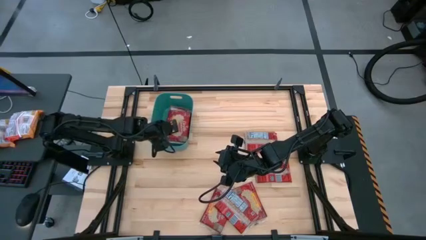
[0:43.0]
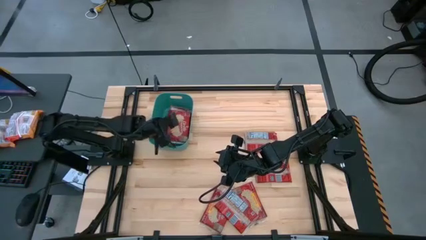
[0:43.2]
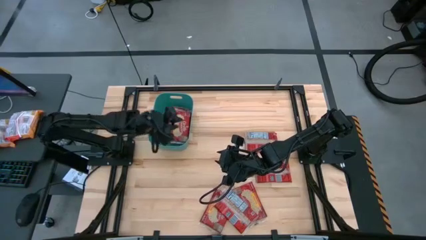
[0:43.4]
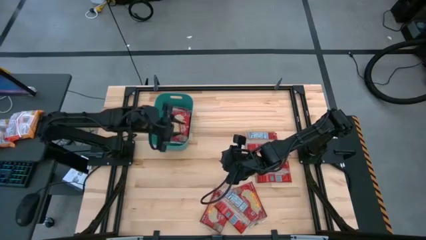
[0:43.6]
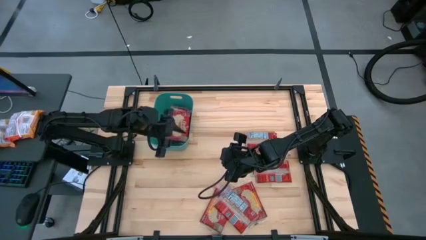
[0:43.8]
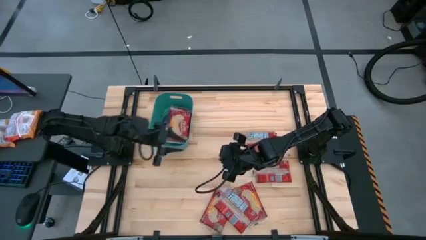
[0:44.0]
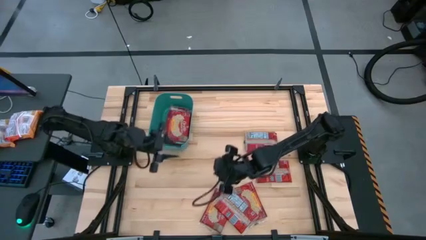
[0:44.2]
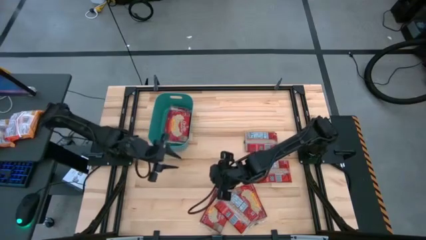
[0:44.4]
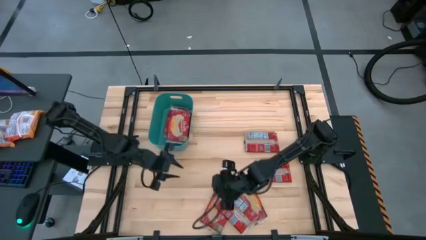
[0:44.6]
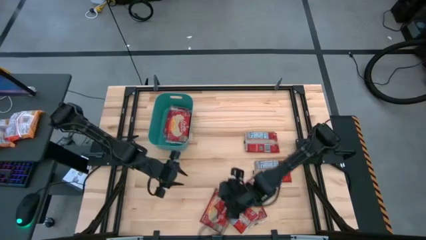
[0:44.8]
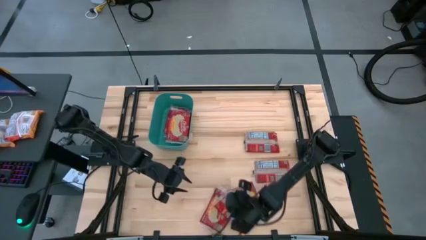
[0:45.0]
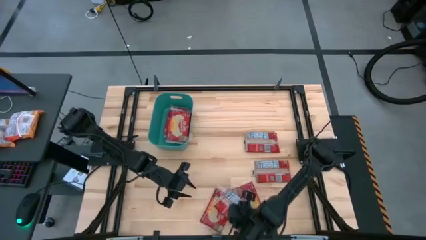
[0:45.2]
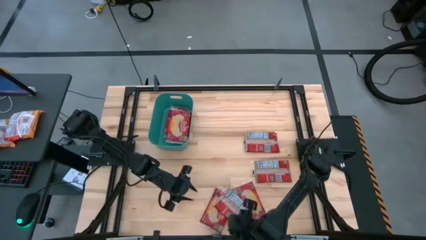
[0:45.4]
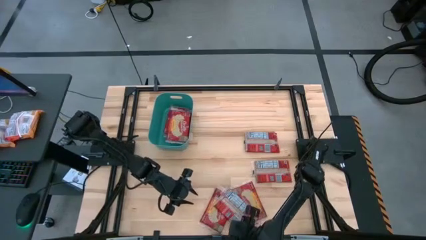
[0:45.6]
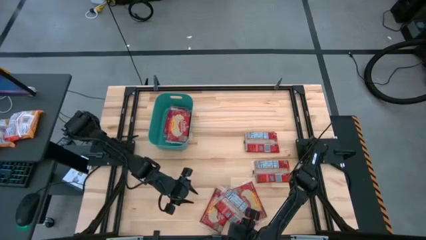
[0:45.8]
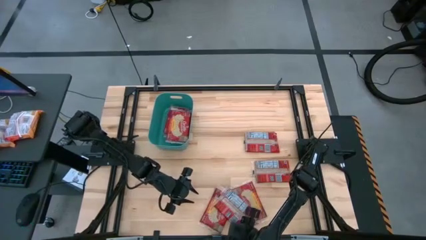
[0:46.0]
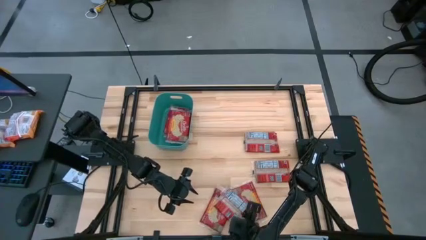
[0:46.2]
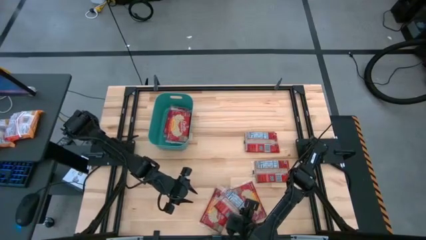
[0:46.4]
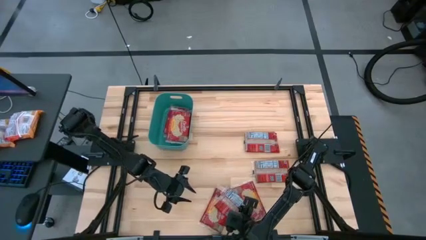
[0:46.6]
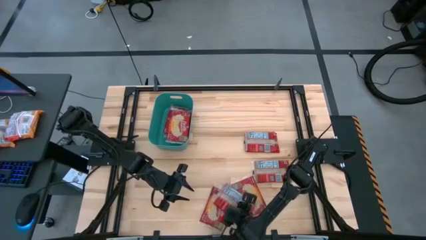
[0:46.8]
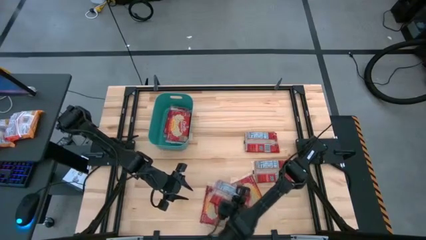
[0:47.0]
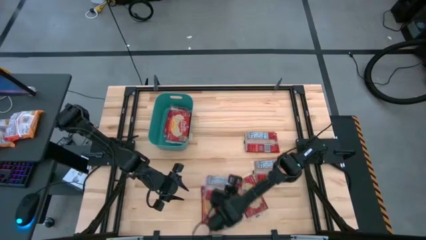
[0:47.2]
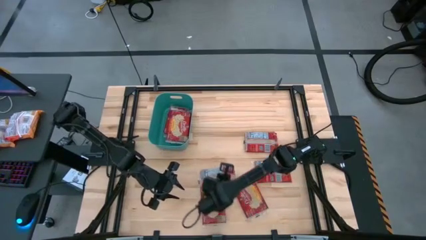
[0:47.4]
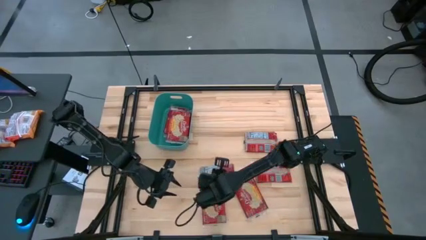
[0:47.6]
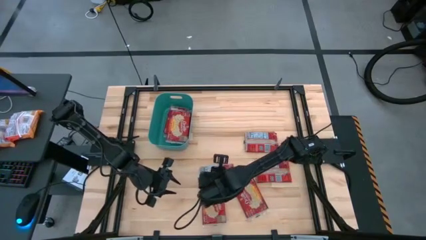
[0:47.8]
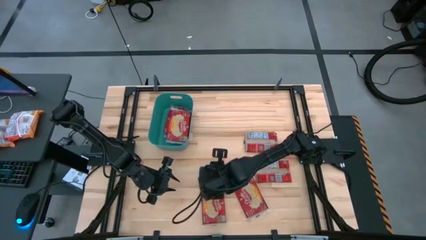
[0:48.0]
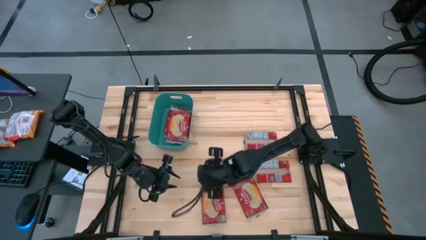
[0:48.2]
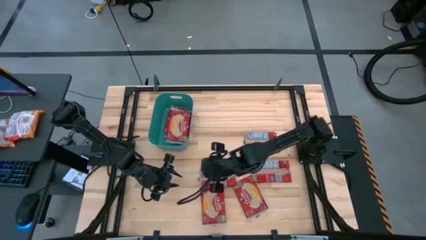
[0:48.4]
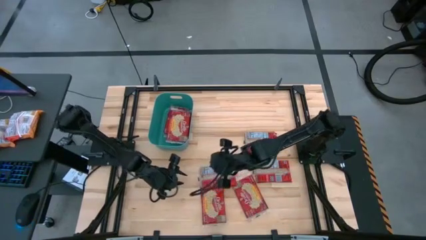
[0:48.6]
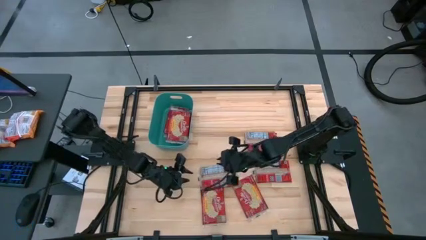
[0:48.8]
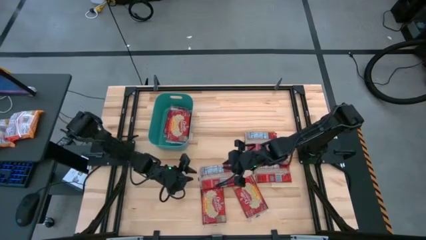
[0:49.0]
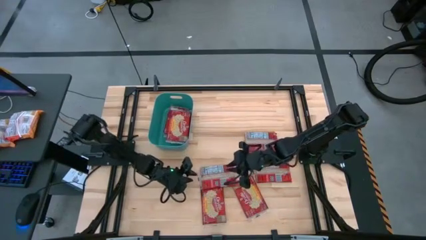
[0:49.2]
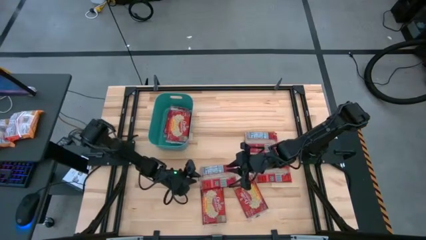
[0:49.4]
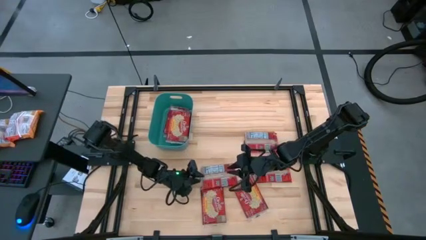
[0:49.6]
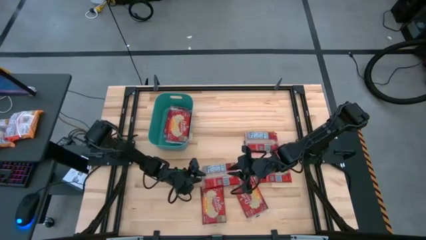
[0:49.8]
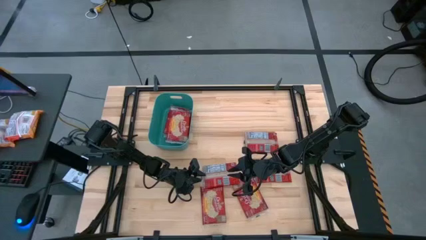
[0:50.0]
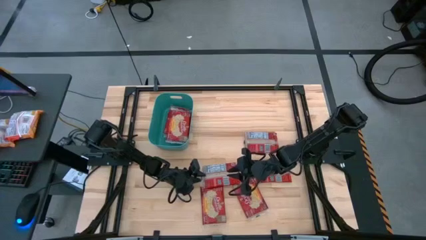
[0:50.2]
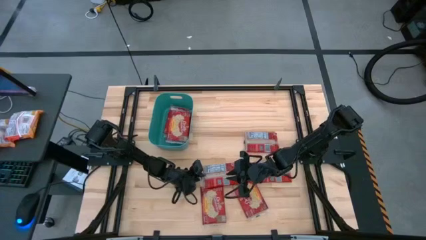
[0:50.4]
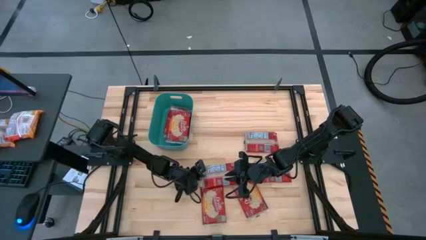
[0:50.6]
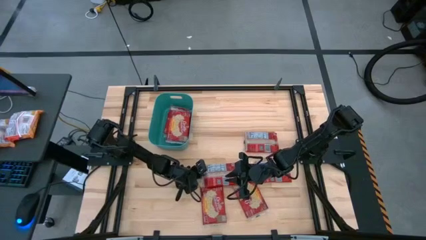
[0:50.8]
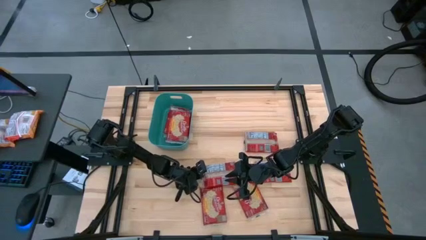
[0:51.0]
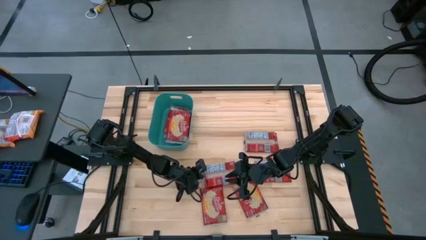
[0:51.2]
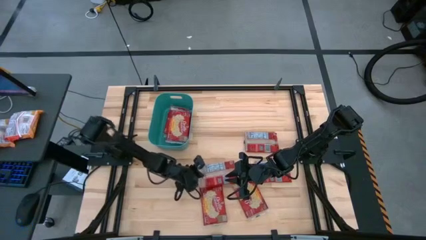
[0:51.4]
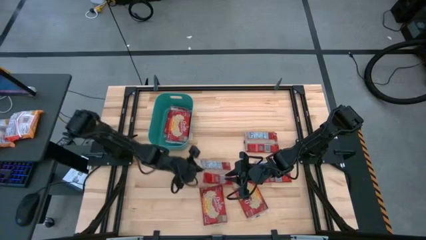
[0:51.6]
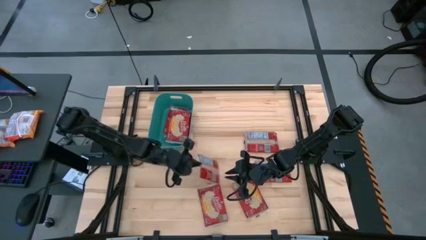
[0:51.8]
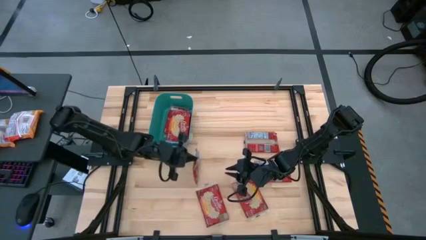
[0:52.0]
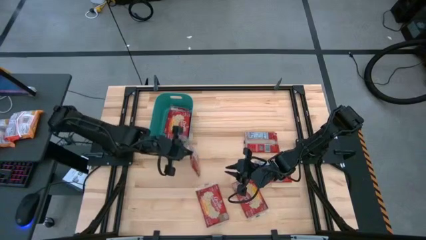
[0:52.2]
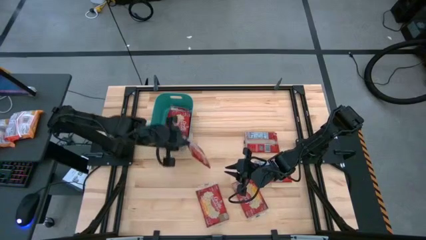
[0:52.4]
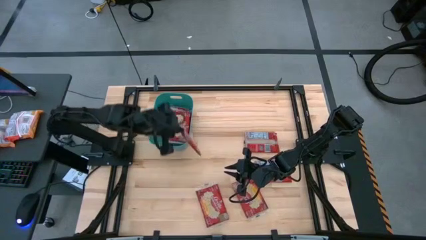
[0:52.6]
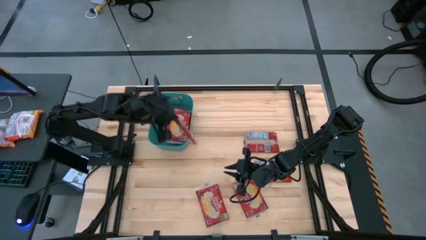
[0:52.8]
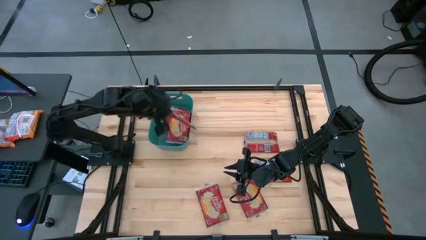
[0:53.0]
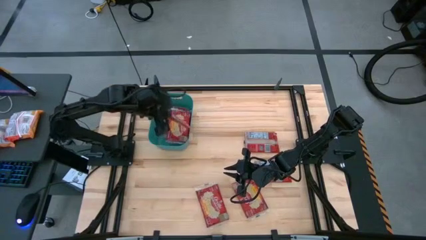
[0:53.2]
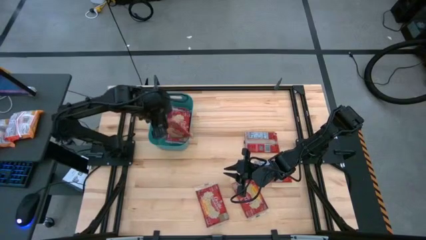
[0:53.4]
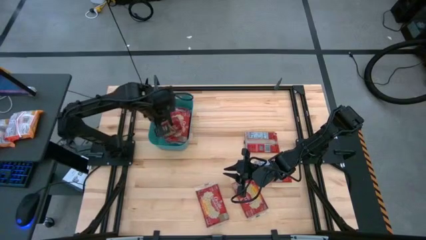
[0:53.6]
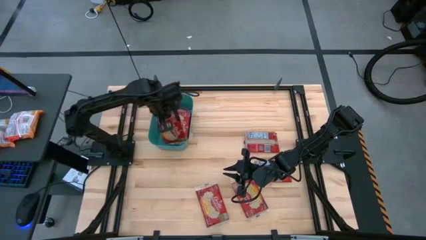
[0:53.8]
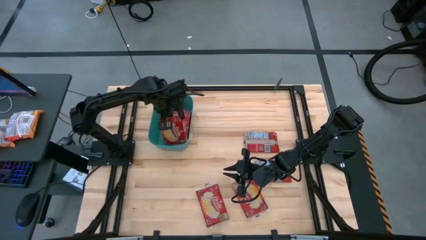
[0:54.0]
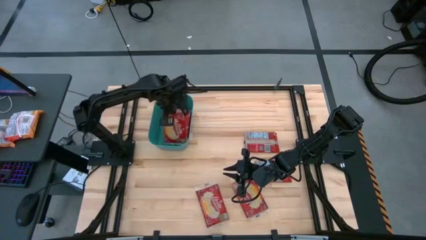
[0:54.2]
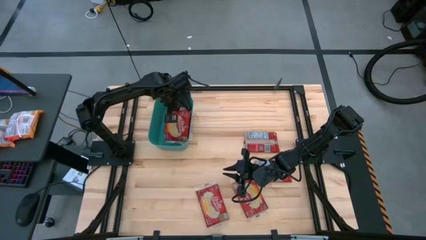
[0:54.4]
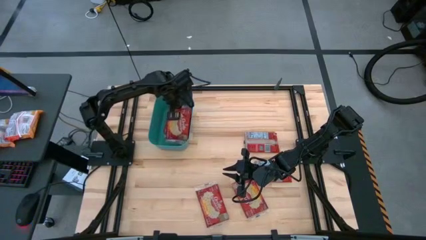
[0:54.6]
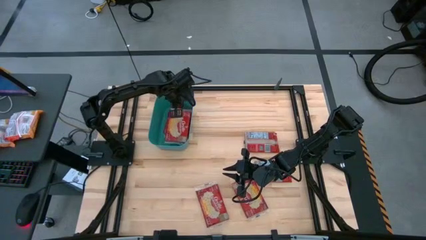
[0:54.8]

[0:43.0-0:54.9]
Task: Sort popcorn bags into baskets
Put the red popcorn bag into the green bin

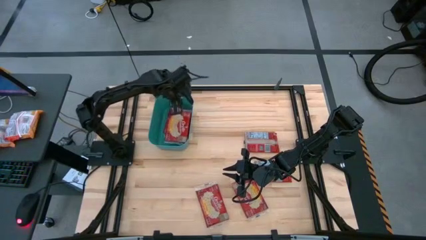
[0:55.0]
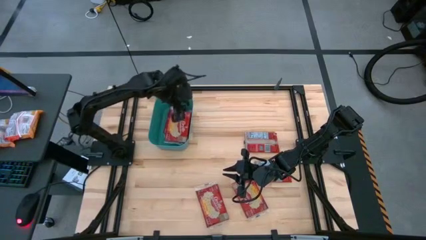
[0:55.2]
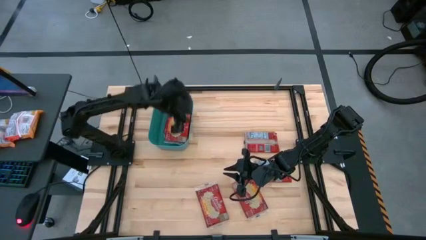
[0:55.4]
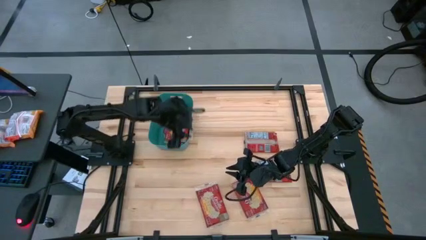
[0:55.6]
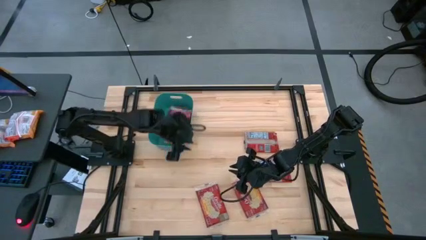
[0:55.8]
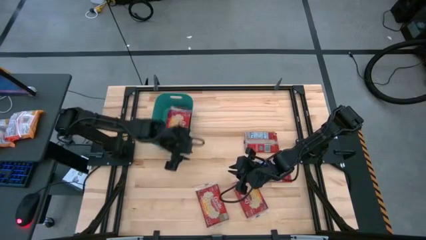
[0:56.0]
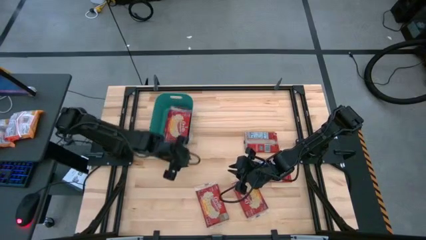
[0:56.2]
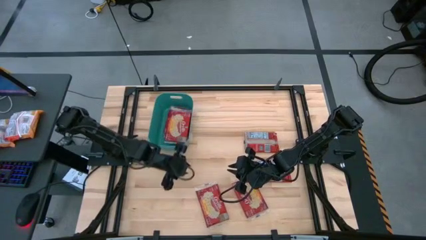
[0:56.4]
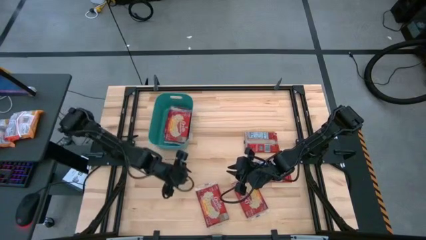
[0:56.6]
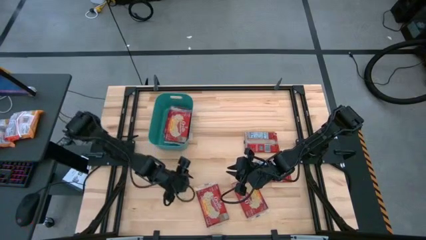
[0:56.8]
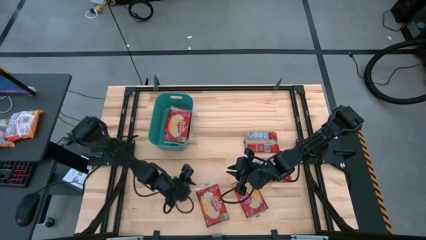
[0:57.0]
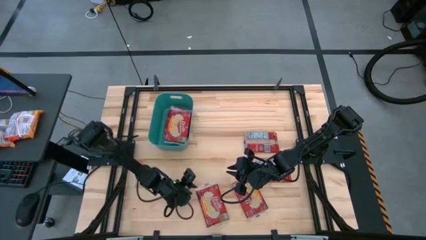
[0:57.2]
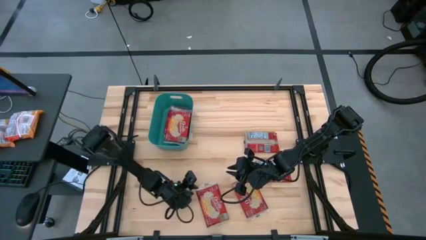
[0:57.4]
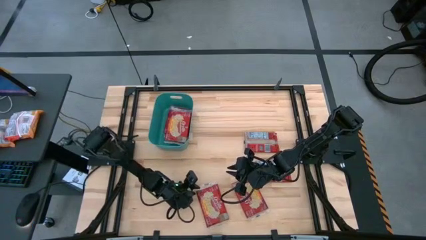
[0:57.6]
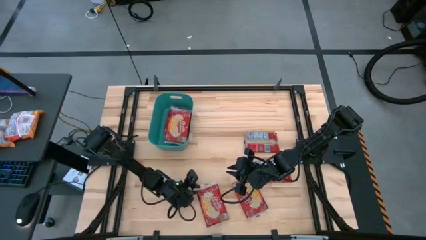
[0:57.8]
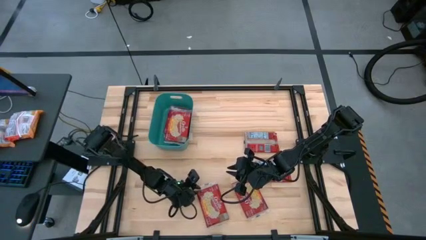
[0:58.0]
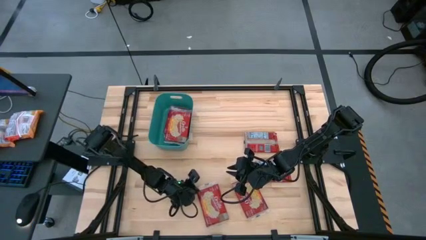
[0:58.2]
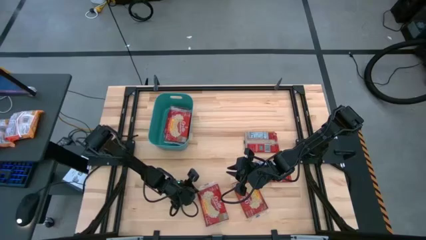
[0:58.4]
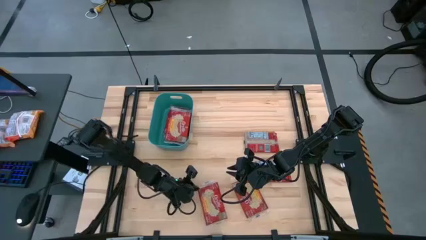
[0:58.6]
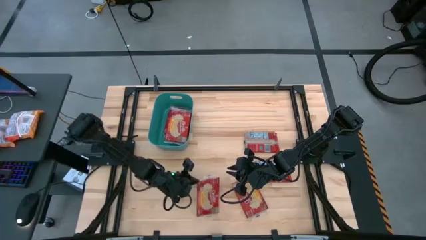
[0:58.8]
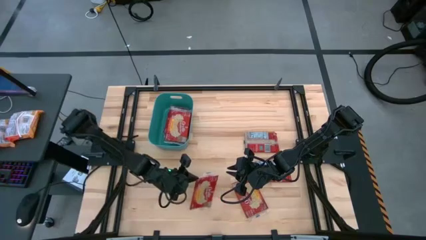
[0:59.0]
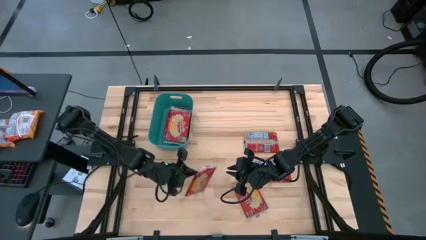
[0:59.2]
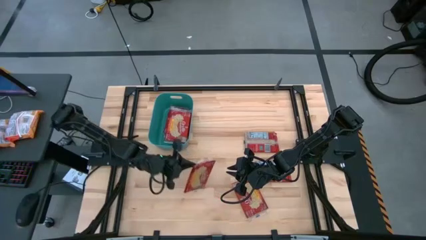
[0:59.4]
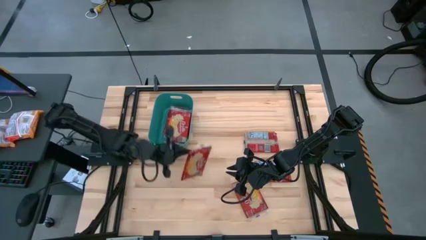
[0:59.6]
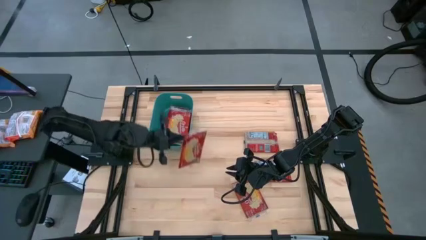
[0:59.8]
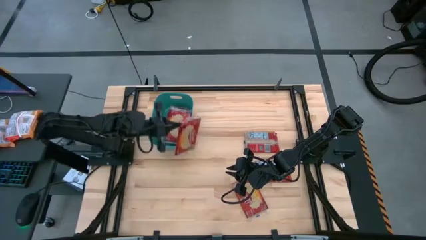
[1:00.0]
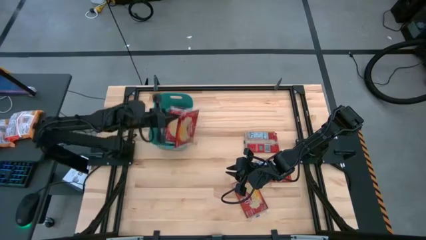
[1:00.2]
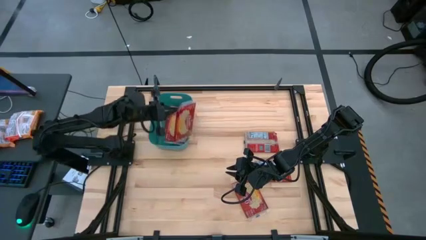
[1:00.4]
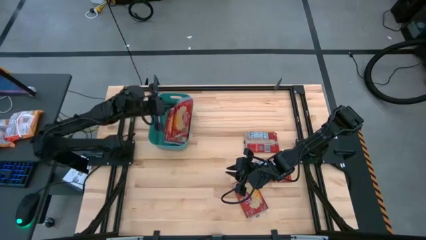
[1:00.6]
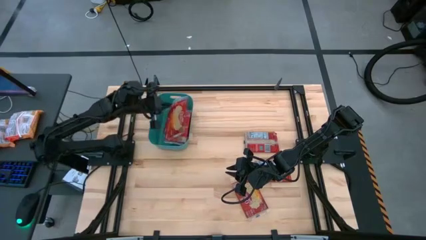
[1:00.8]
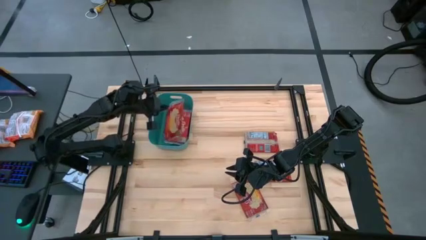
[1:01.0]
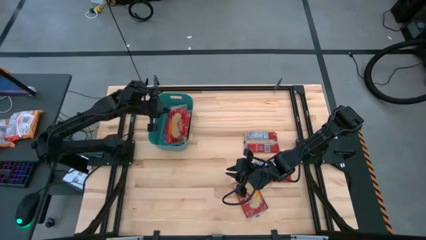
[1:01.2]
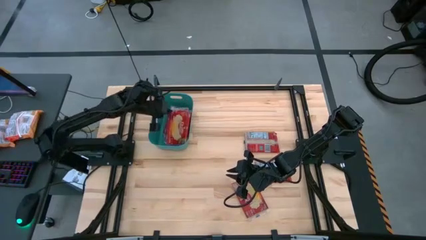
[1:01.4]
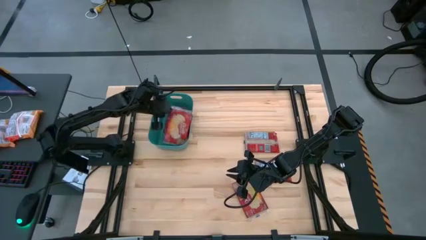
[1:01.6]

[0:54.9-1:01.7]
Put the red popcorn bag into the green bin
